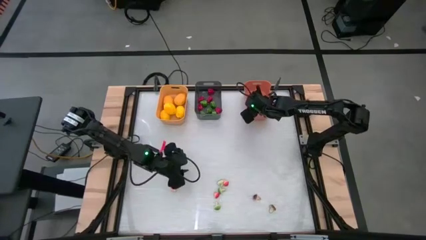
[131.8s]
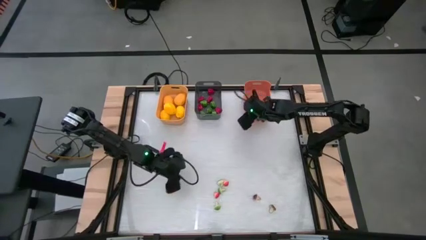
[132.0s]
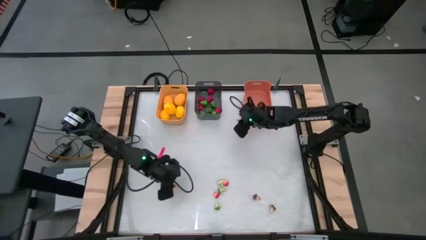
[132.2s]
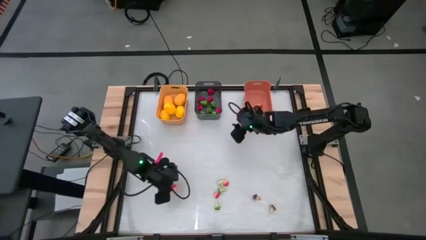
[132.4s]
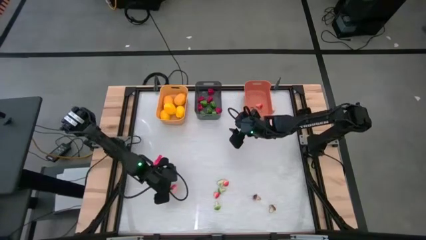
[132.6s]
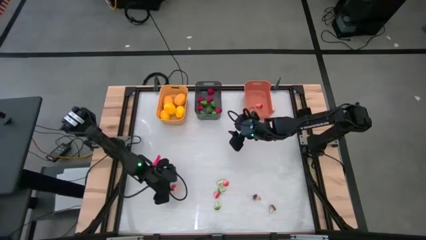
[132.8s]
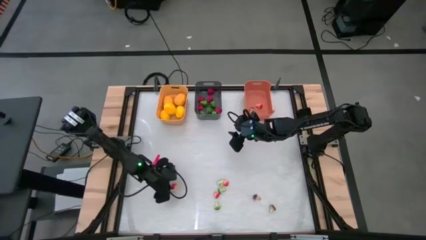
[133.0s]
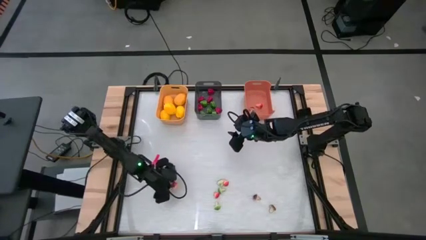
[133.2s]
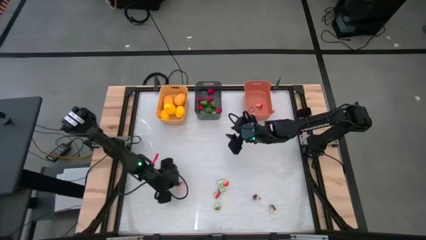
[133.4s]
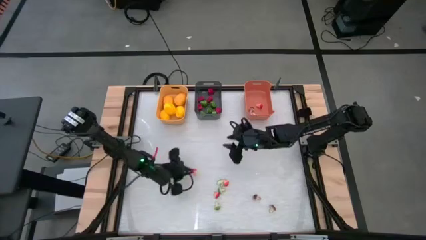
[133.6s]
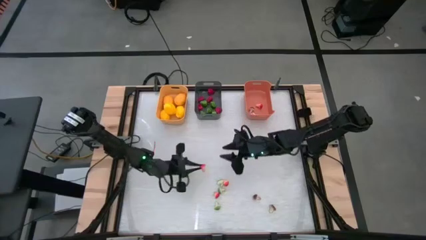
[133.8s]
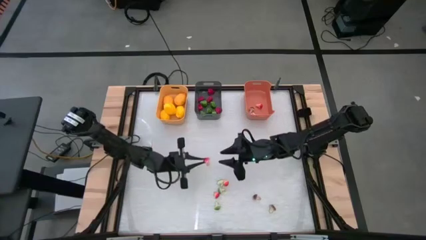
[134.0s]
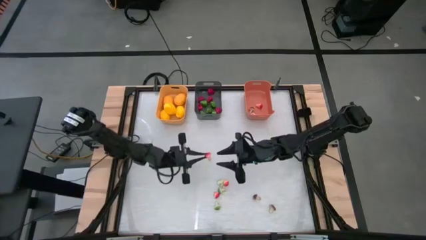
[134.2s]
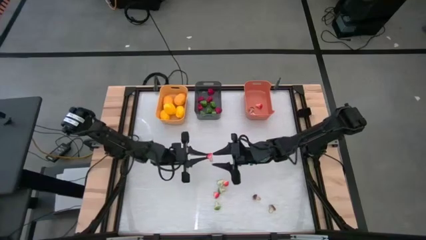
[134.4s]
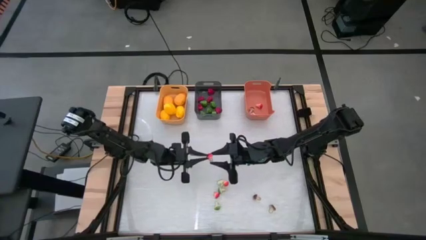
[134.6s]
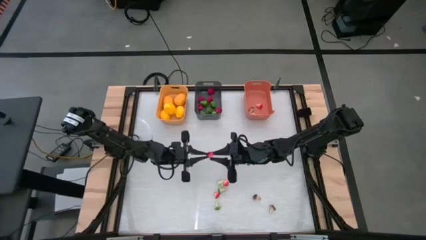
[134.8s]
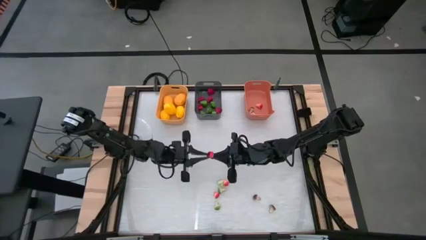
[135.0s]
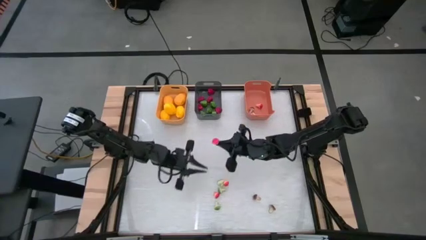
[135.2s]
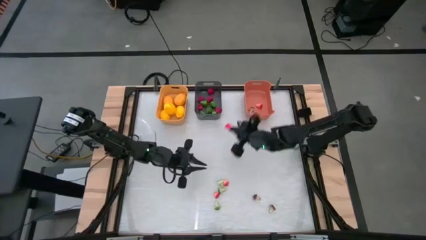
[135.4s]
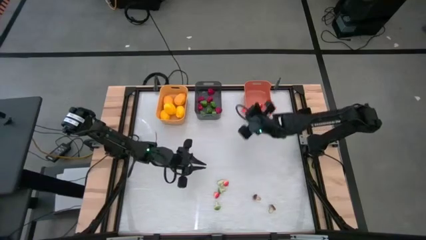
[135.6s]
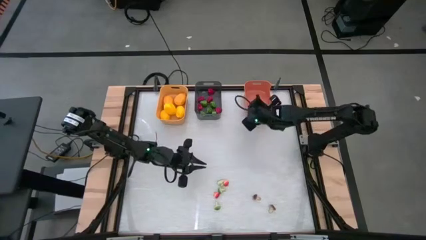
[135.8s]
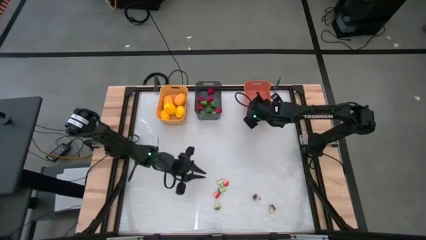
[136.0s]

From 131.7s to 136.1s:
Task: Sort produce into baskets
Put the red mushroom into the orange bin

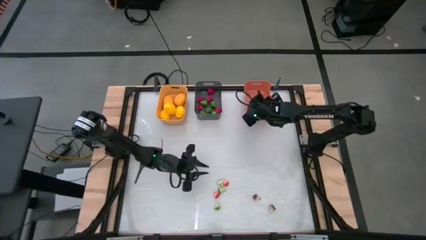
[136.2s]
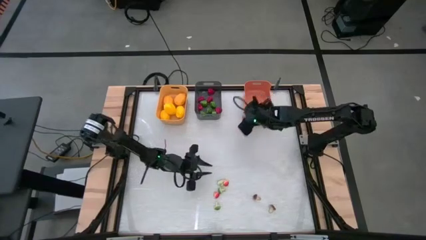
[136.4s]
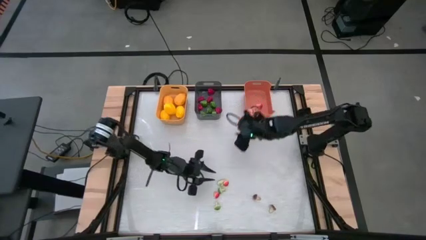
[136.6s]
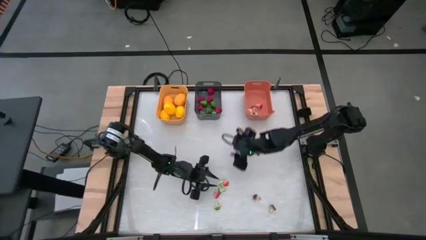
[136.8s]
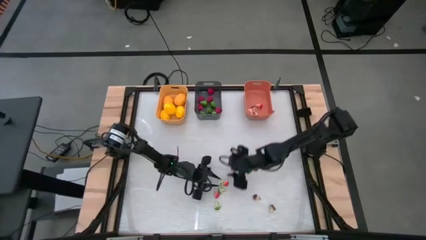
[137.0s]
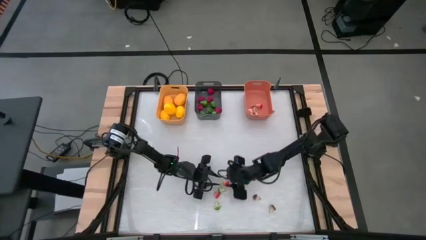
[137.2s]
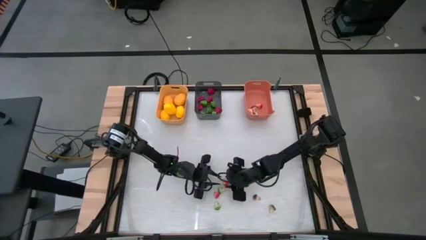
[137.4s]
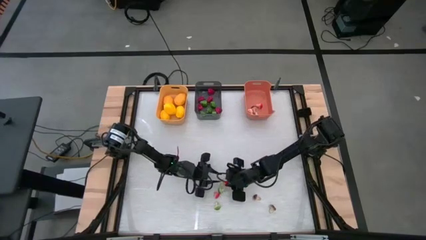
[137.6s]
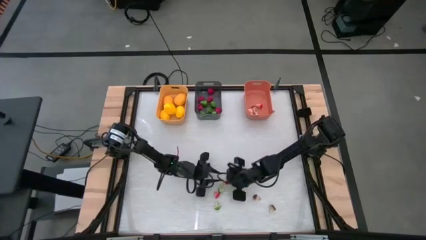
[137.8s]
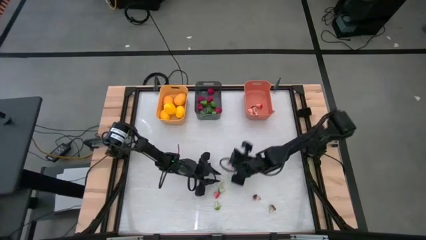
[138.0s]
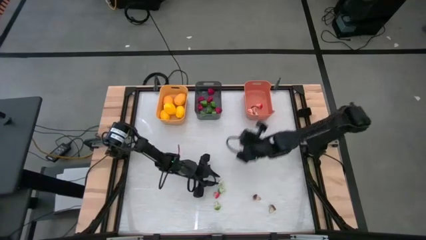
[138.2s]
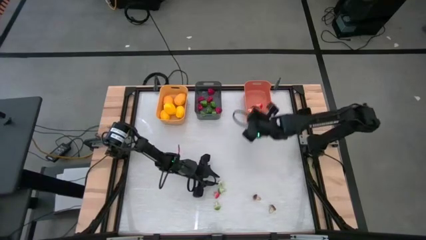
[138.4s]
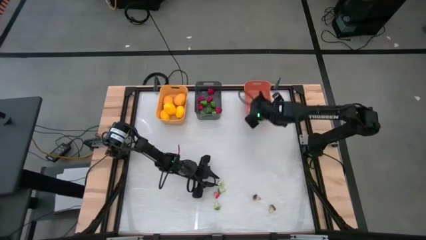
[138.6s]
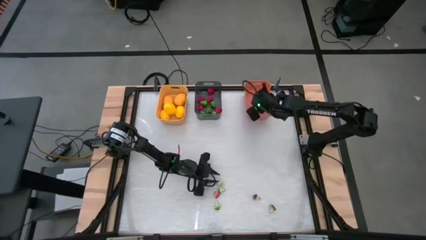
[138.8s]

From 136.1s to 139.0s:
Put the red mushroom into the orange bin

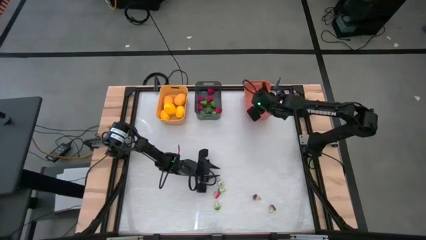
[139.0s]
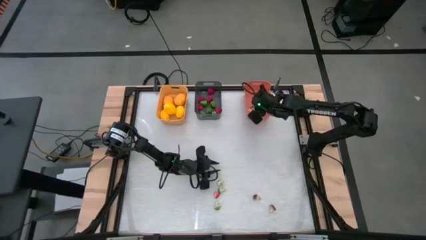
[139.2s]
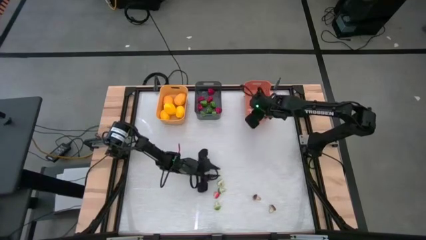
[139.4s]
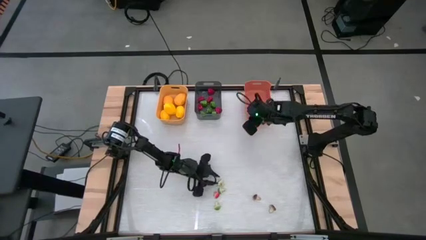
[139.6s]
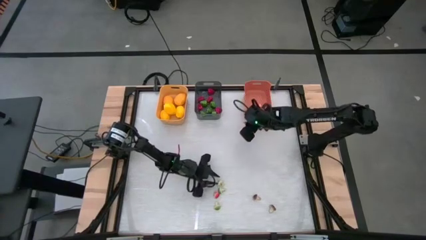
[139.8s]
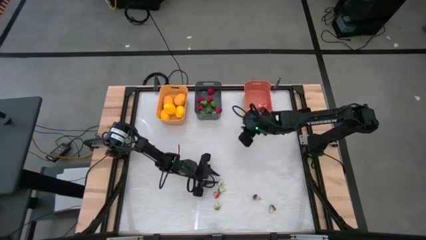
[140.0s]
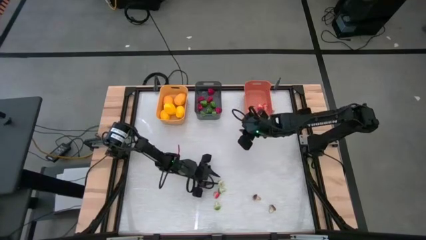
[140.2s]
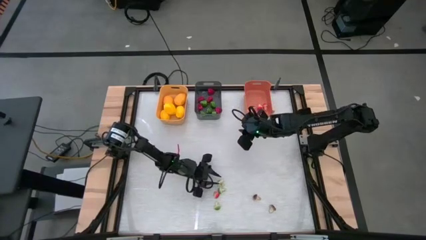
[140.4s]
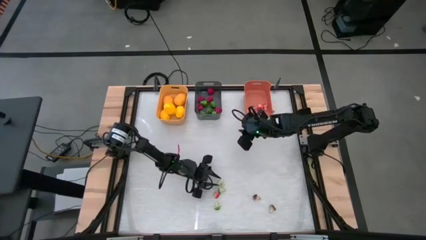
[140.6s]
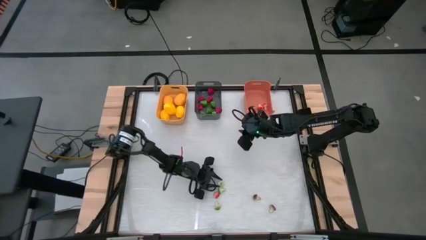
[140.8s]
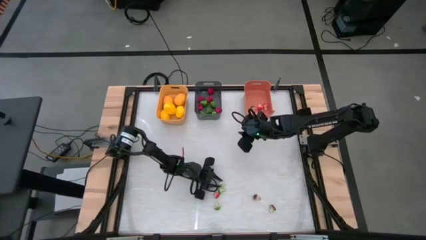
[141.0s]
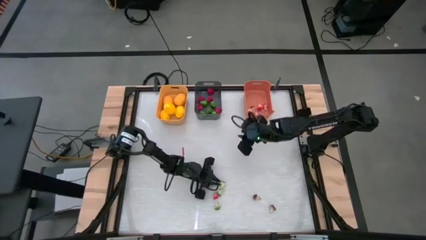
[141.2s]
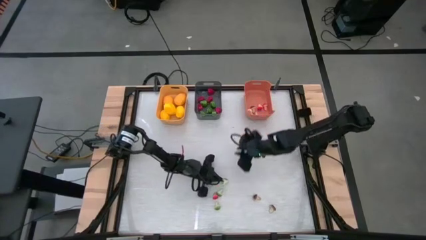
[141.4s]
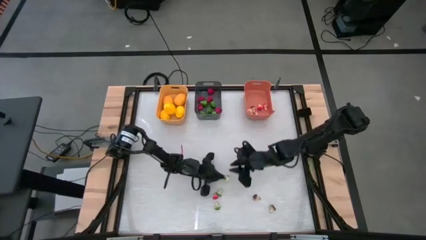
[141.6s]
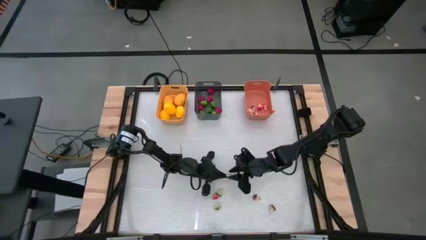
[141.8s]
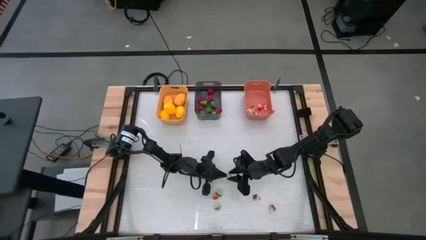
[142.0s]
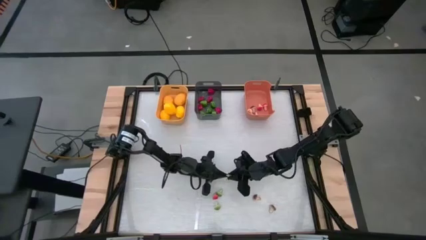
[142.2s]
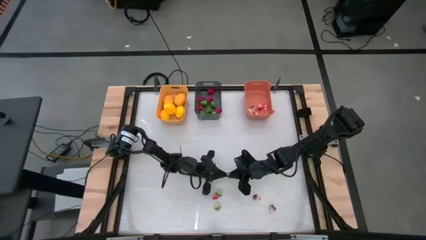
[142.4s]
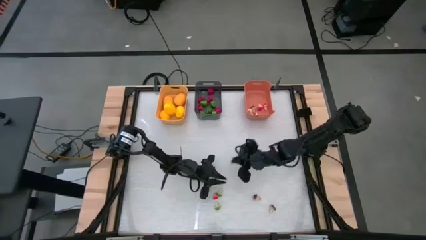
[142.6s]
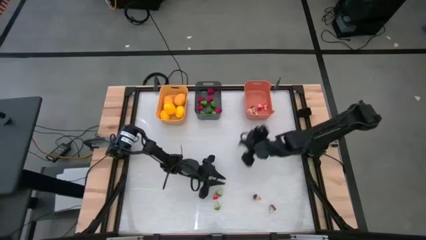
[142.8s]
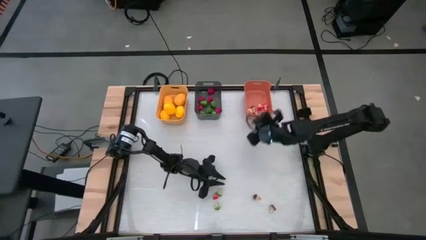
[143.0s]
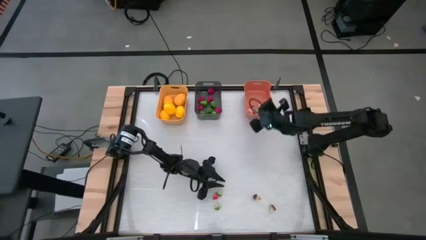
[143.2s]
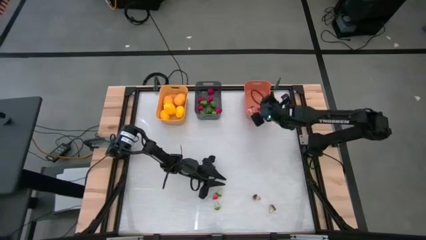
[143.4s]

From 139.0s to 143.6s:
Put the green mushroom into the orange bin

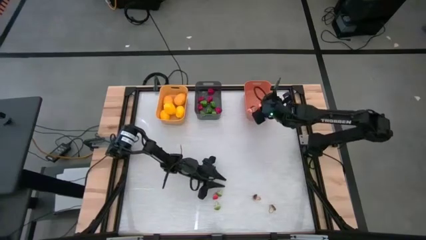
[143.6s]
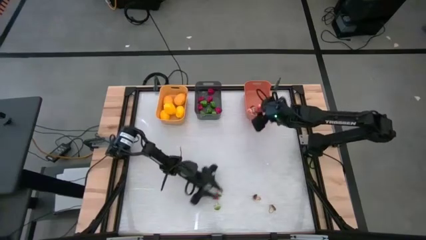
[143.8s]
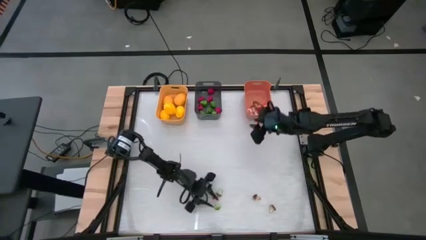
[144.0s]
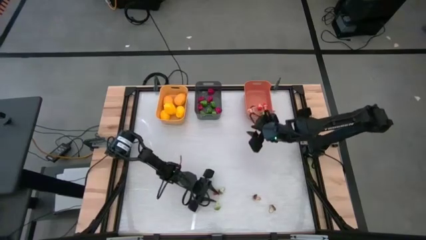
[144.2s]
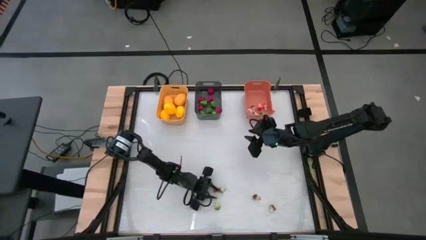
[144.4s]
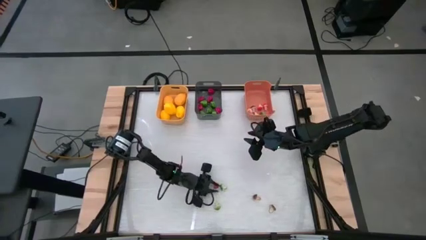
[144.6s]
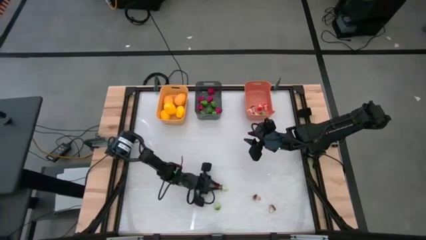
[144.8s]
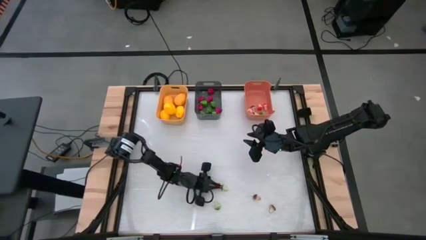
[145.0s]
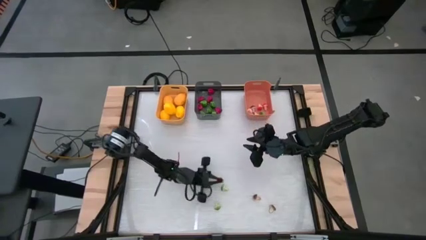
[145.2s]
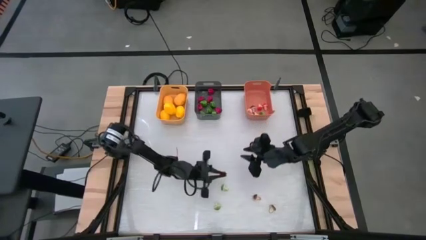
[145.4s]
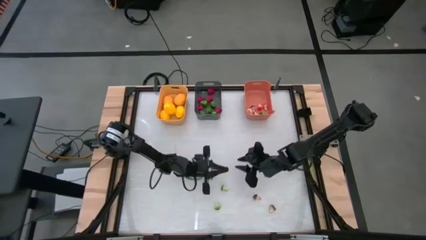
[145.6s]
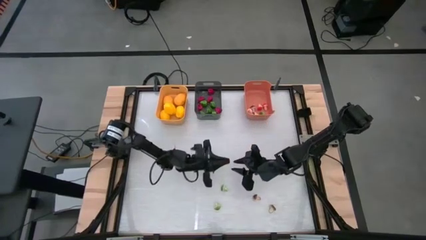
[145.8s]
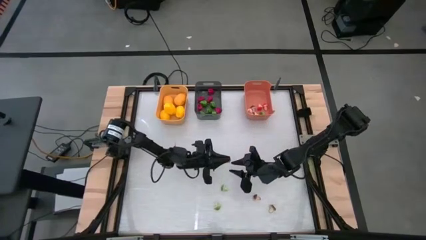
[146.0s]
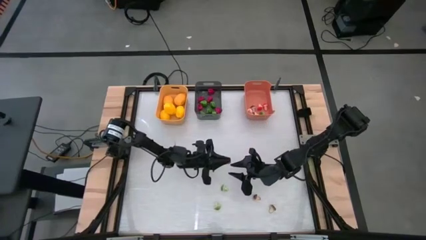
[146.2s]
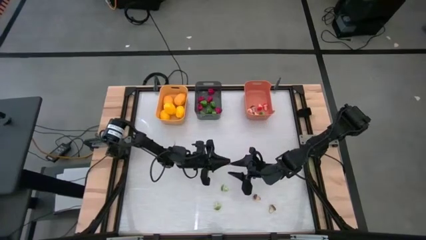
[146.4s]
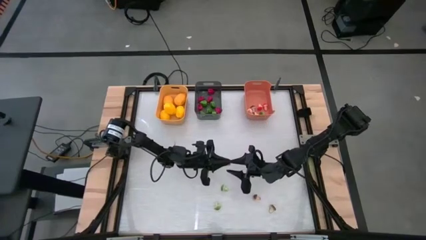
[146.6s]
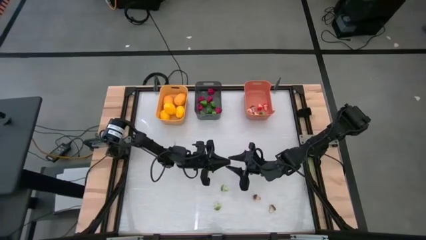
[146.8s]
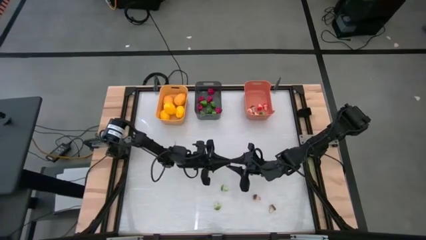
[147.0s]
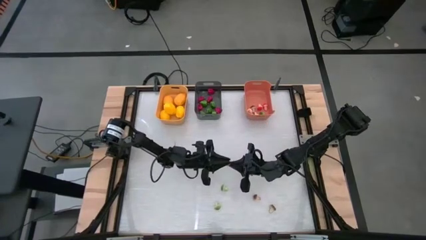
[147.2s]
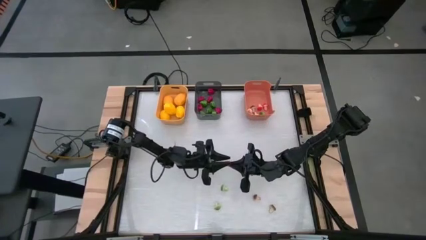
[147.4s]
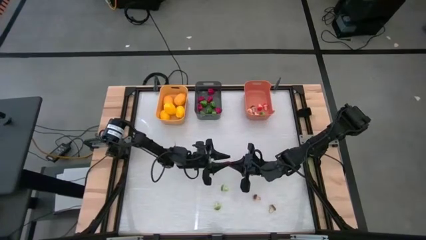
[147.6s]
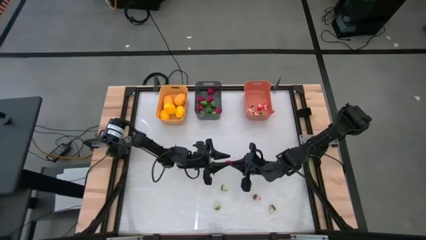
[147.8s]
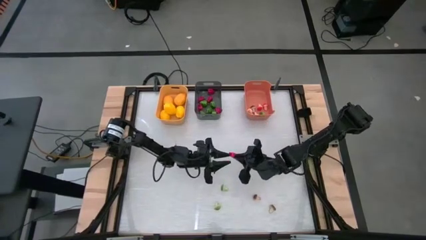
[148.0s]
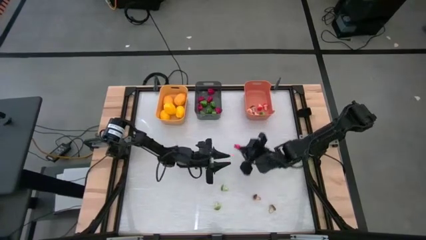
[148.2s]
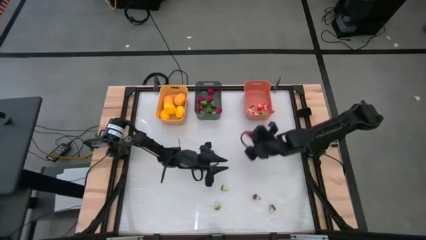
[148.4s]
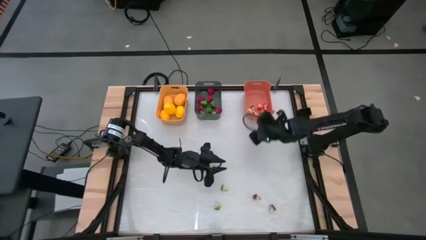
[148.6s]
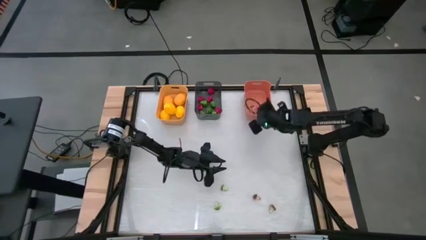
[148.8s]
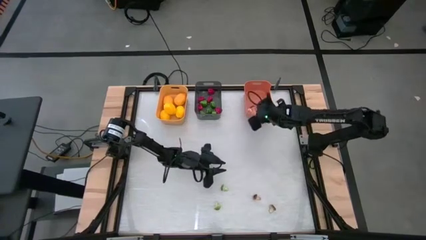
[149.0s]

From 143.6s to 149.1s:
Put the red mushroom into the orange bin

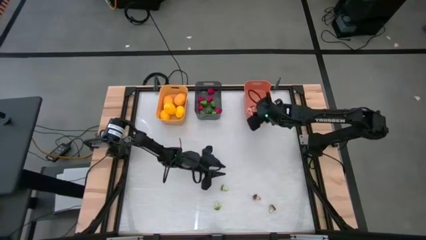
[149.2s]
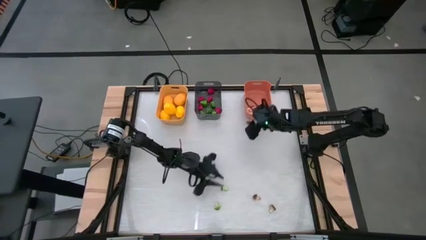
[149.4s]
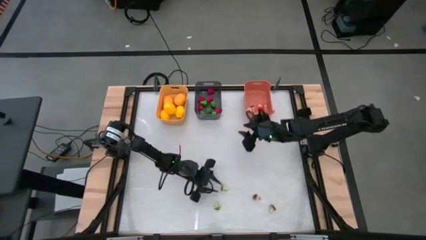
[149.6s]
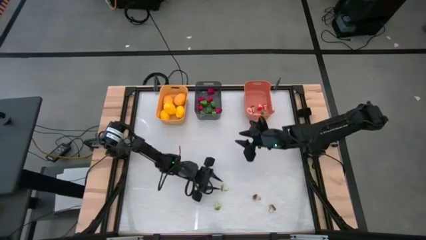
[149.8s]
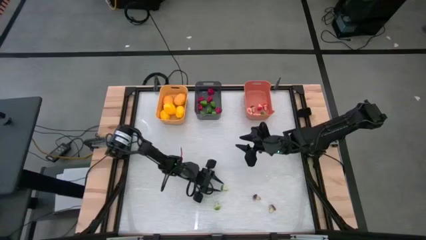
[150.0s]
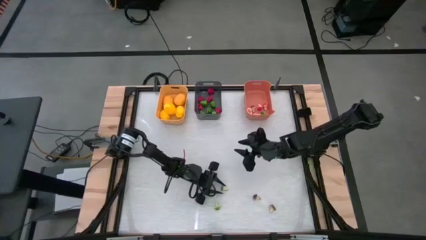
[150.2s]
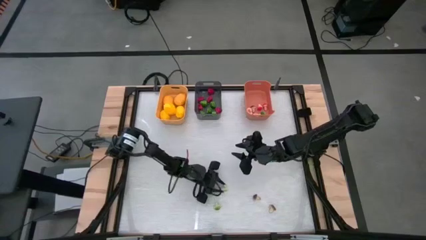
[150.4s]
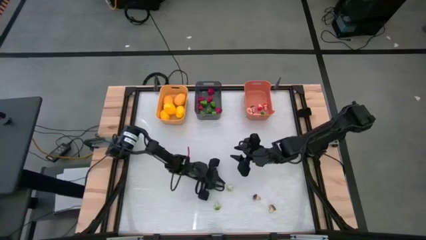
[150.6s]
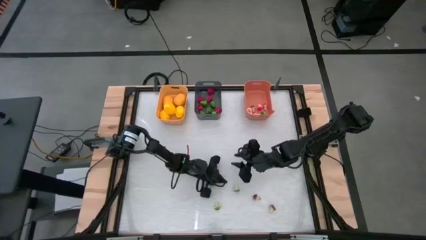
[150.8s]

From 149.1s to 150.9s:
Put the green mushroom into the orange bin
